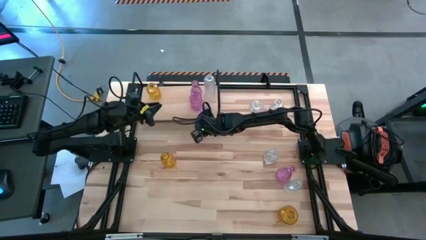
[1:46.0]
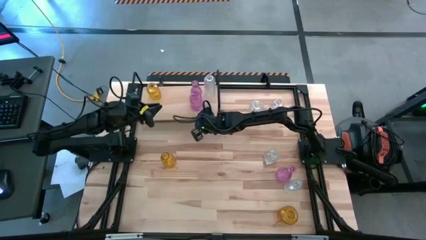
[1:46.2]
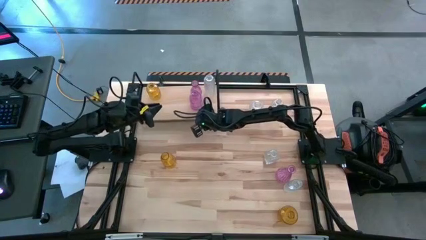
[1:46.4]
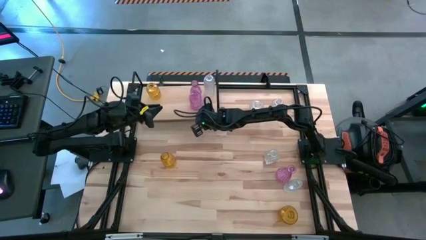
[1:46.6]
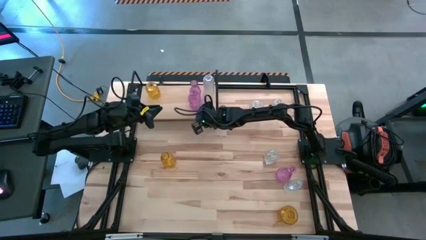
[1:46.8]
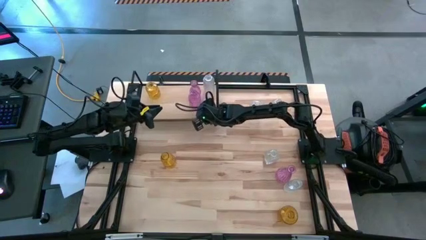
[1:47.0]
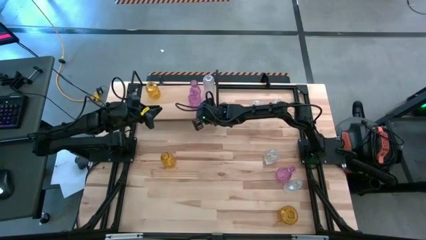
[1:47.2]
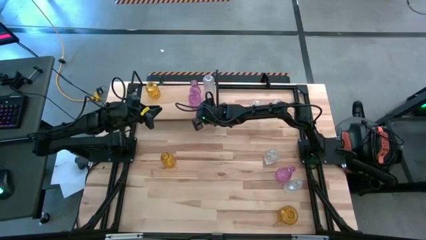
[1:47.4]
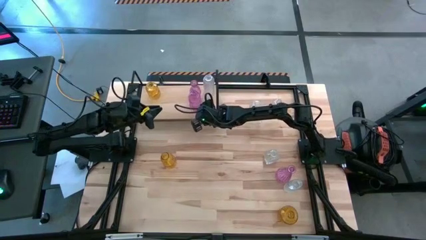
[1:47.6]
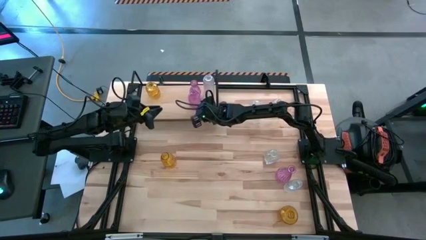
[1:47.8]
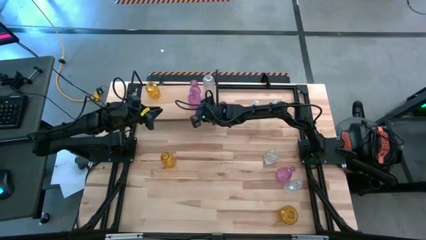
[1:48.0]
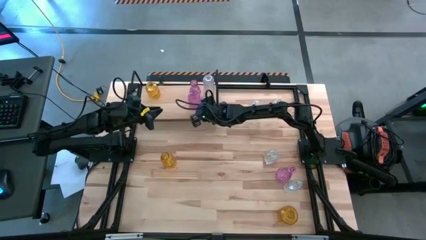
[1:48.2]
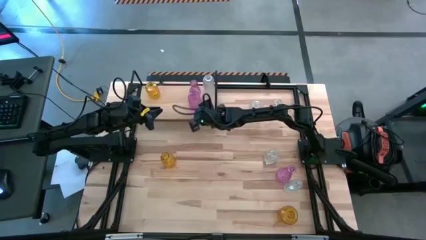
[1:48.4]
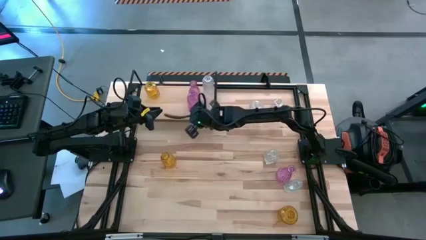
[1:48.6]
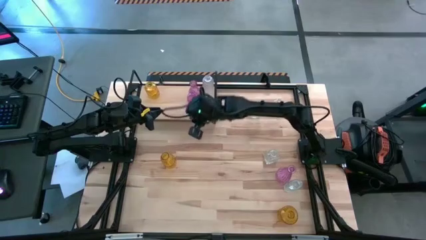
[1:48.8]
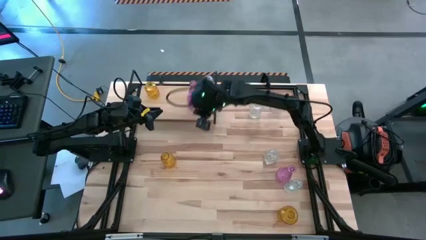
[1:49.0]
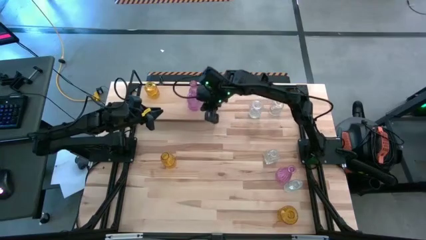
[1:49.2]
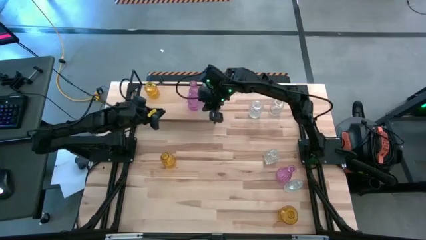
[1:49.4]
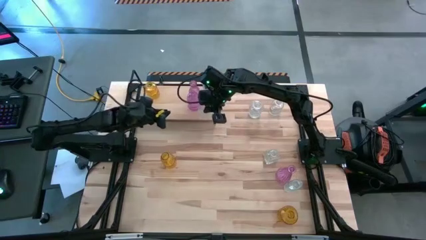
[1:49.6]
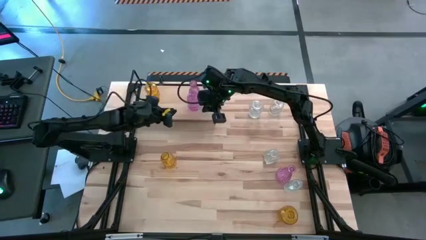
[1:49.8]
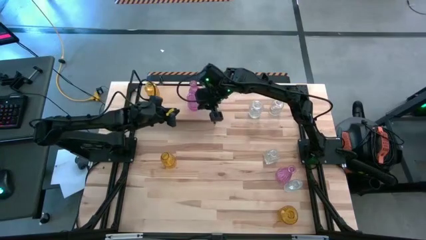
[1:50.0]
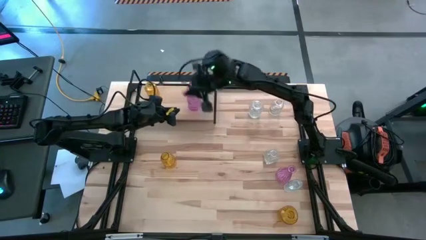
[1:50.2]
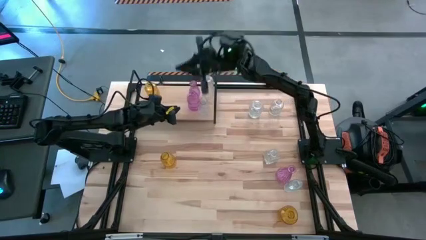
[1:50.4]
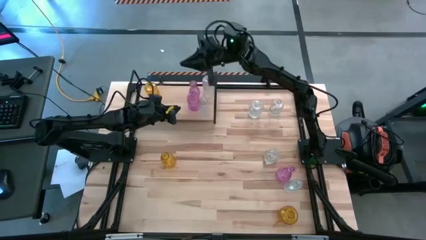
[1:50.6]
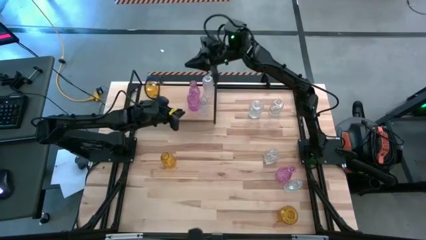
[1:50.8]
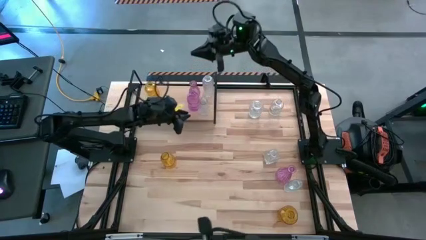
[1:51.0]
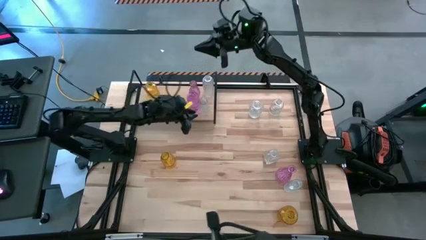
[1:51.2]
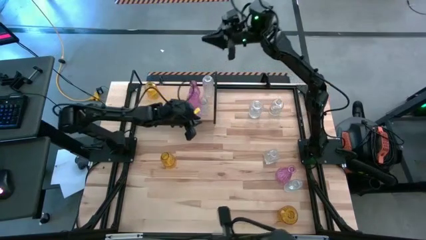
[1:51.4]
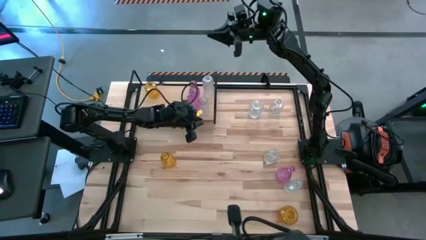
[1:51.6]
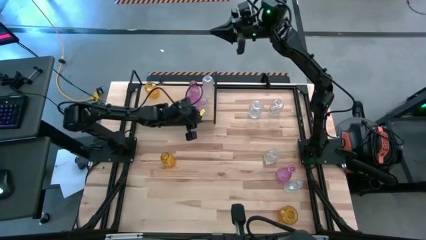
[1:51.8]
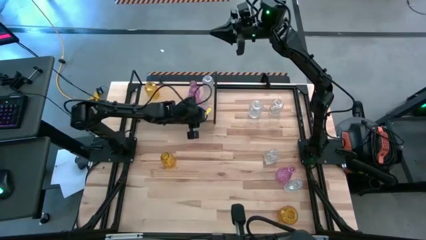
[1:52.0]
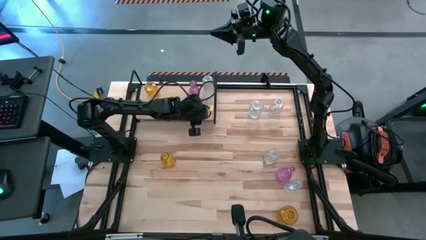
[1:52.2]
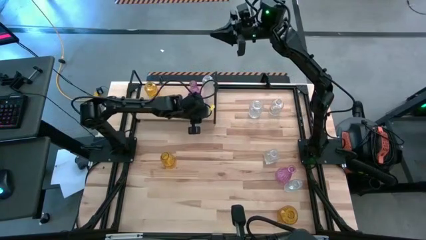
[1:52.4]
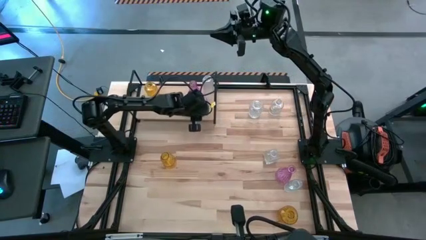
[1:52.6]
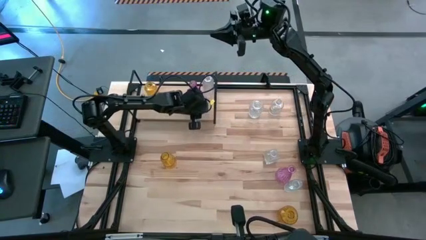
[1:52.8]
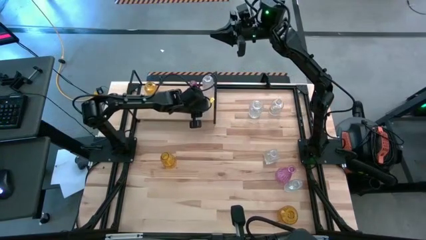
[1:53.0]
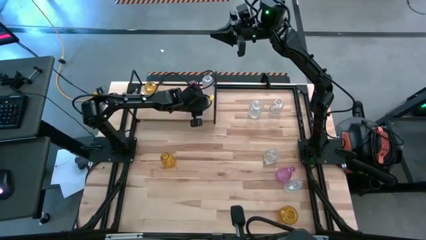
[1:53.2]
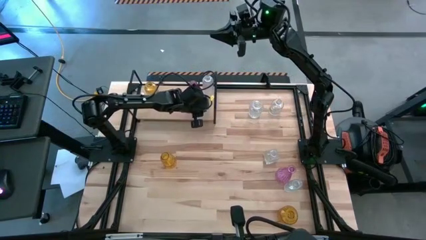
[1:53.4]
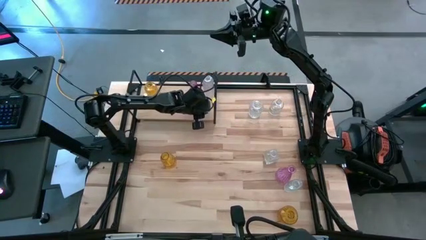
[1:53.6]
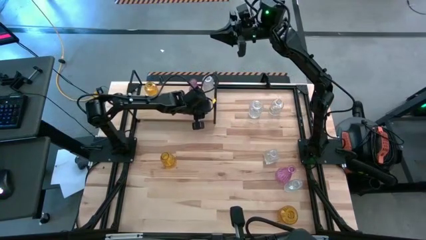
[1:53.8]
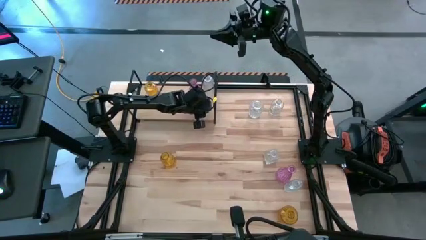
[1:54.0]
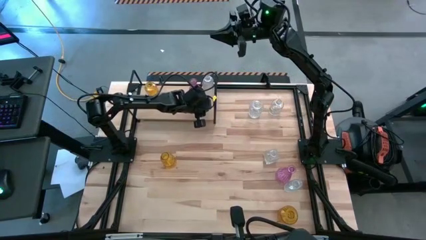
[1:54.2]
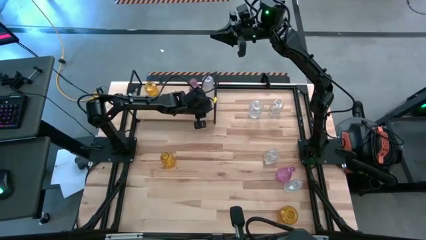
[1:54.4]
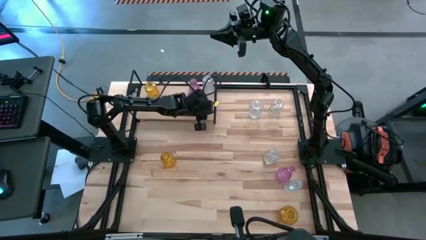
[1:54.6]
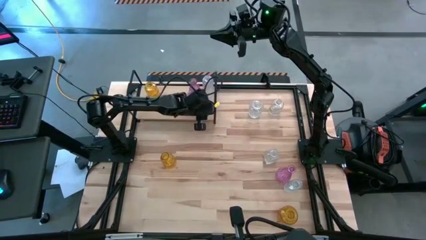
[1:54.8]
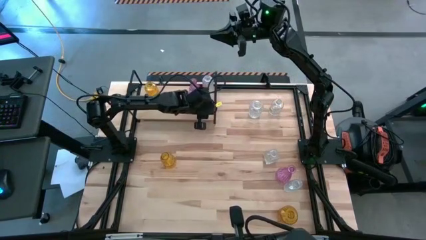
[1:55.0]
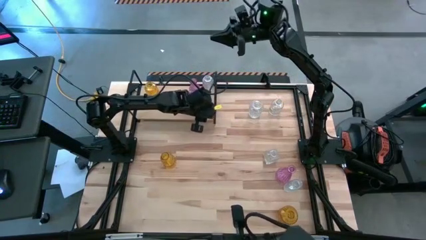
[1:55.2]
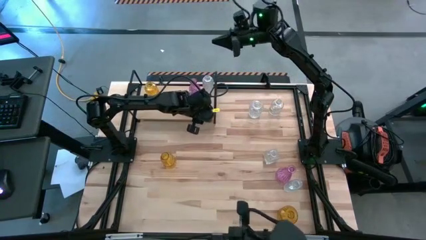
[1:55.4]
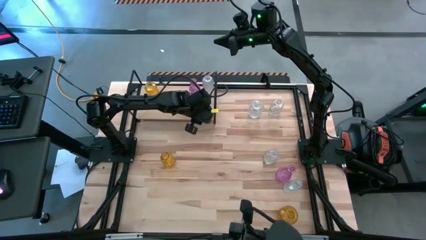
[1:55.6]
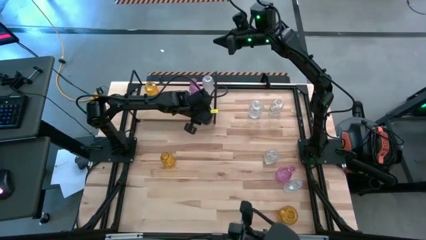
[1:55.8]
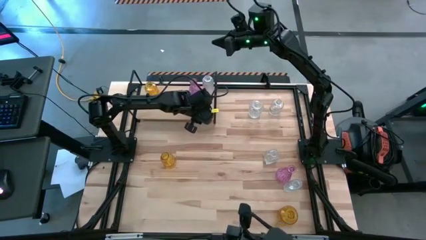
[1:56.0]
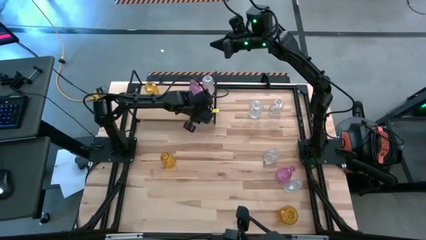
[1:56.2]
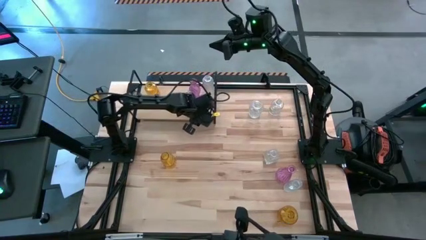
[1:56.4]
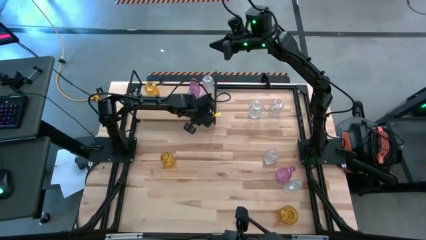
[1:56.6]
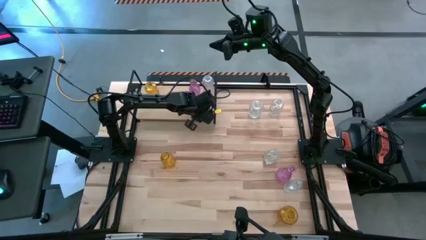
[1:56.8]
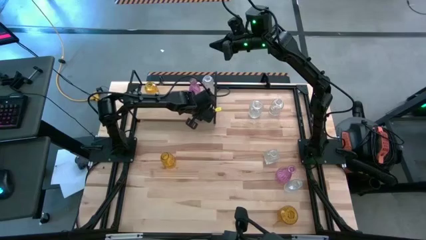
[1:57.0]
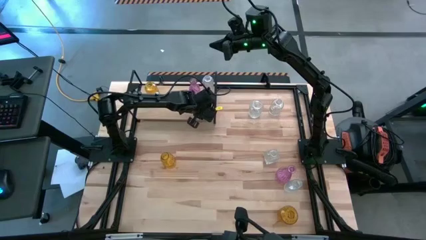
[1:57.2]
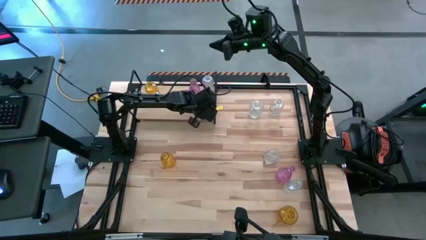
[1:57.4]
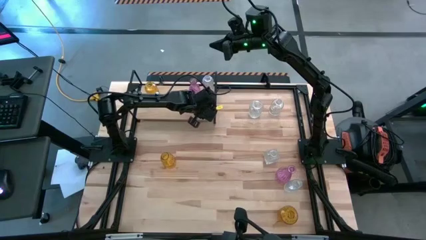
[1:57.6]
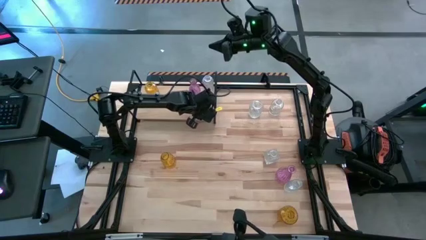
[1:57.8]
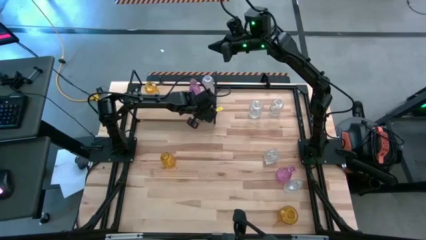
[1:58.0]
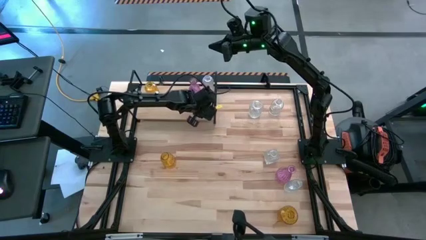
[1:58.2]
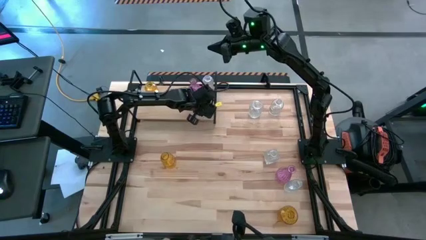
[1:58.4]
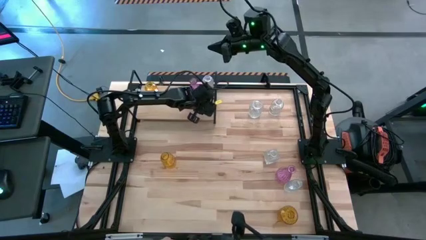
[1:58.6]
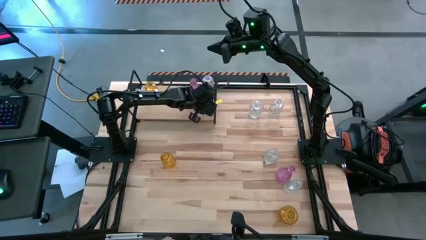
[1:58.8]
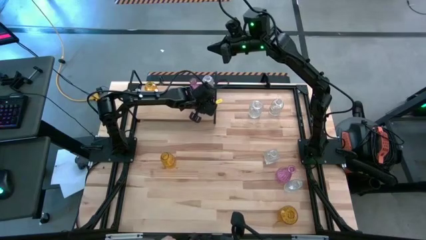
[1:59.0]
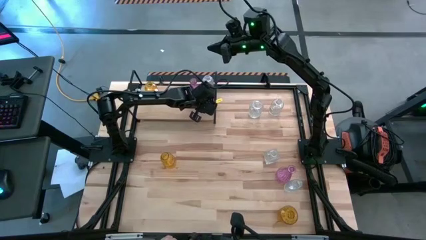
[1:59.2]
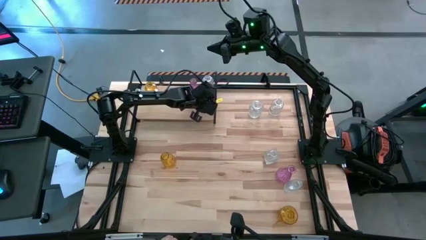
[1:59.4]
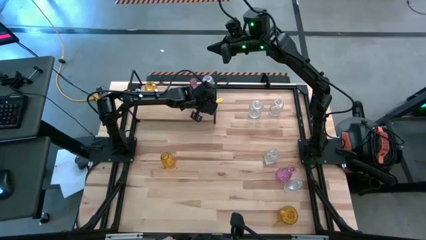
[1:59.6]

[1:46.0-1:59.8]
Task: sort vases onto shelf
Put the transparent vase on the shelf aligned with the other transparent vase

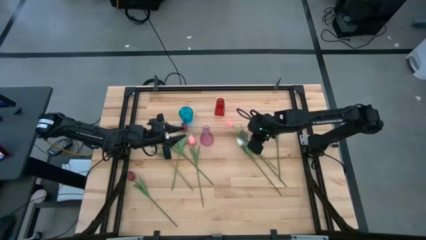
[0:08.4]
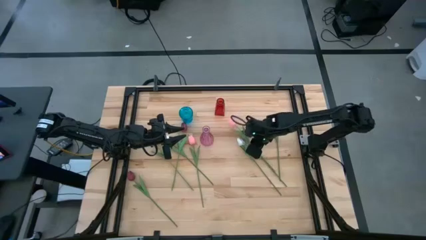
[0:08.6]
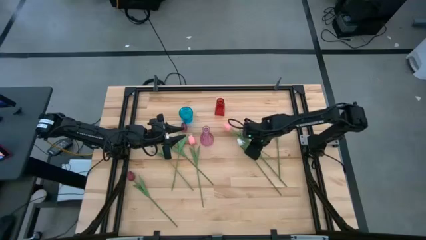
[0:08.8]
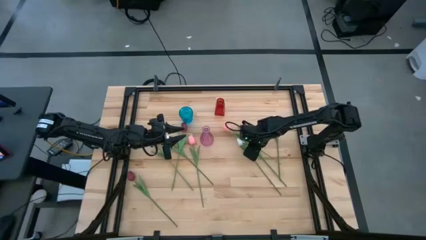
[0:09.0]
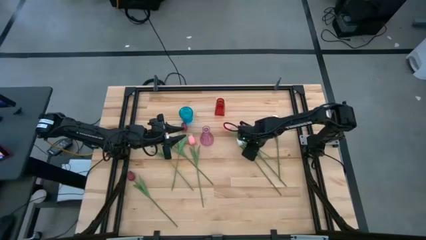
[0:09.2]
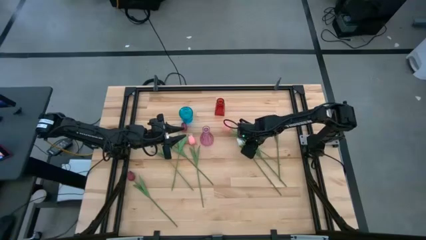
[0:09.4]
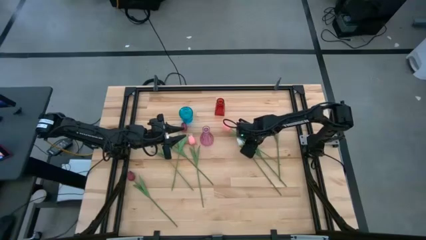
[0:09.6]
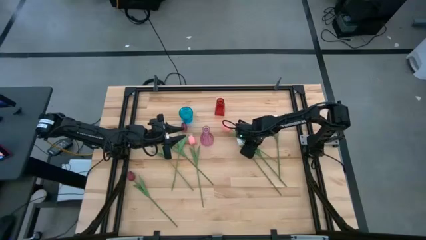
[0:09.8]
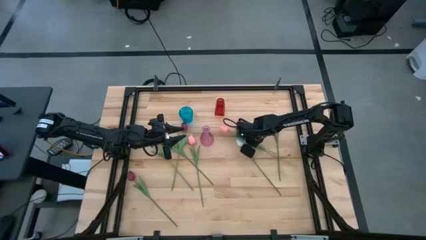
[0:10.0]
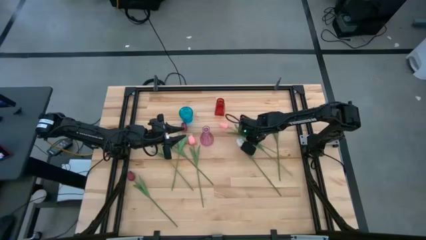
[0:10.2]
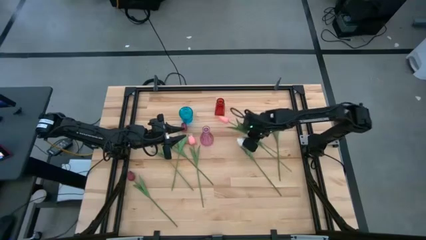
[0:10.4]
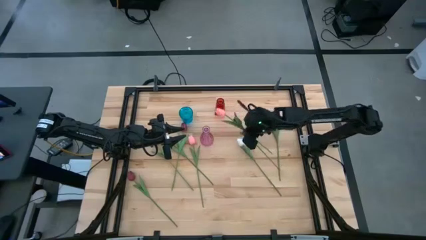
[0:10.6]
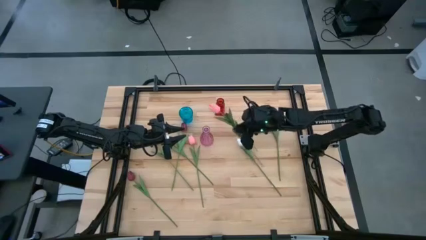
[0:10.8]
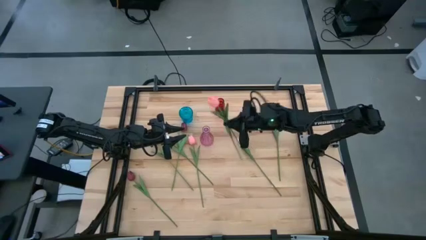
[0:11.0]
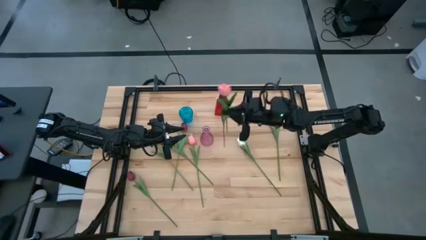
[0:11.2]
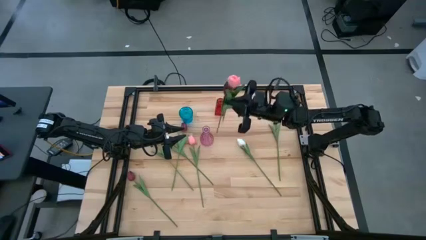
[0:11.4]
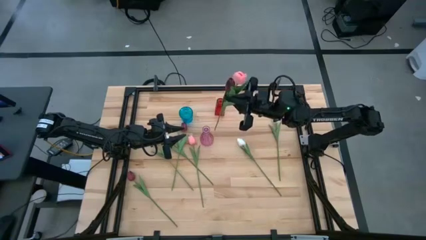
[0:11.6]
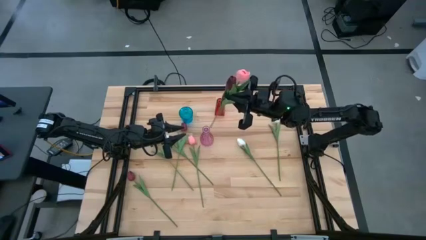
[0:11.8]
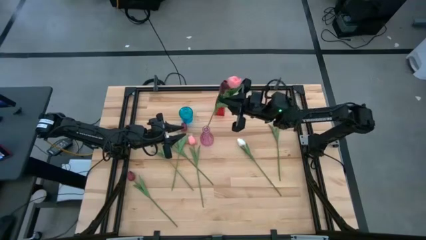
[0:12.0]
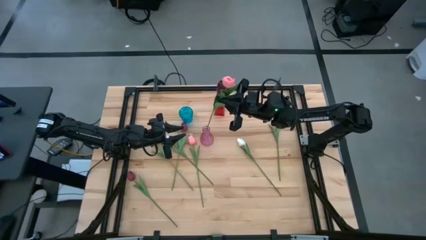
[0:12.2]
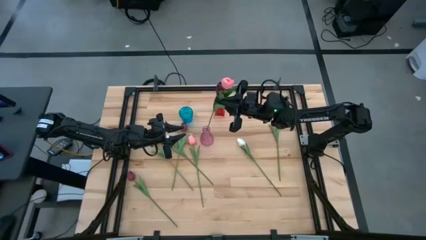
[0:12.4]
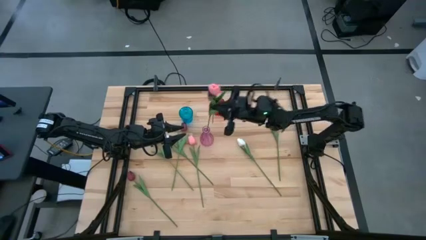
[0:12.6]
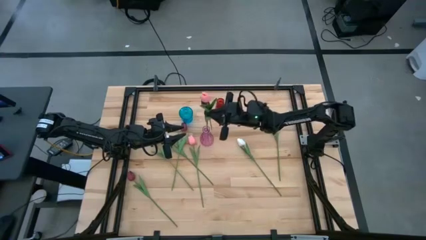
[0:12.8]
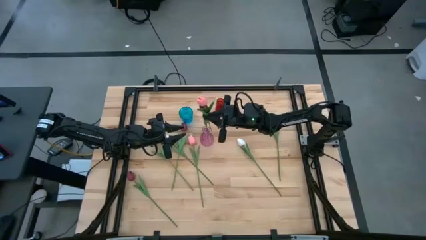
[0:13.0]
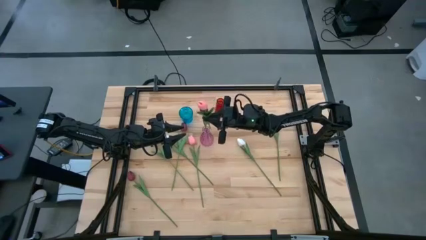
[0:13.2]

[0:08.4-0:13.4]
Task: Sort flowers into vase by color
Put the right dark red flower into the pink vase
